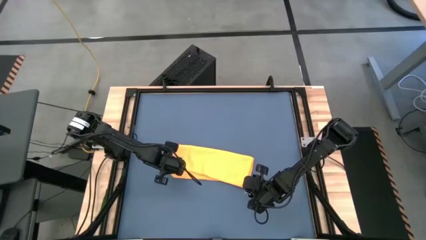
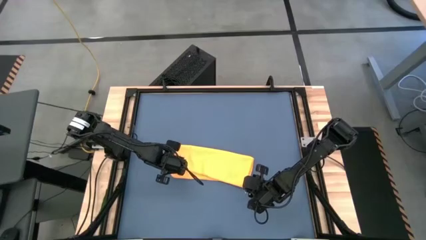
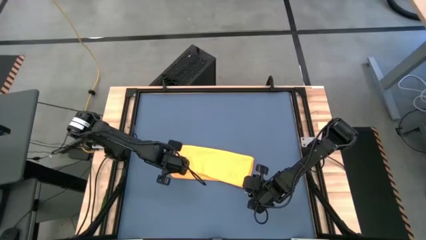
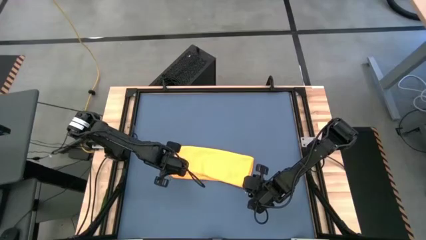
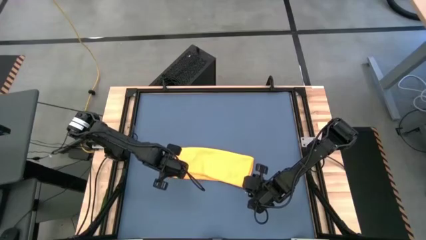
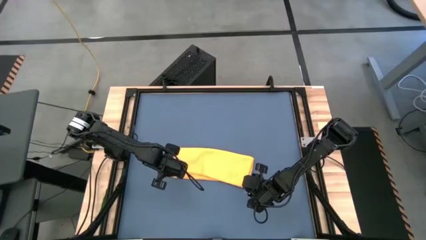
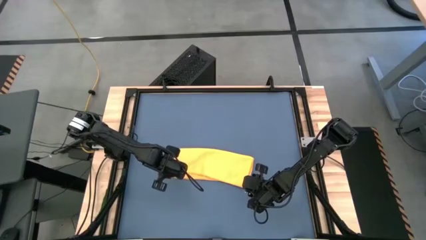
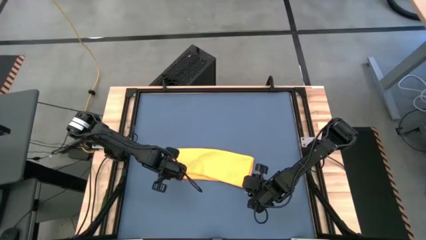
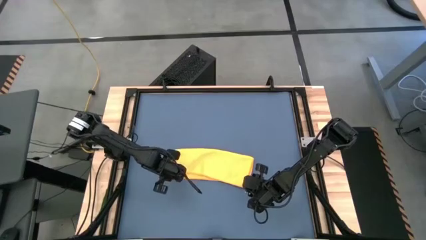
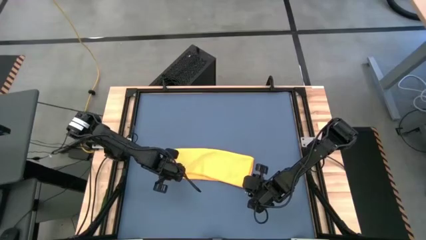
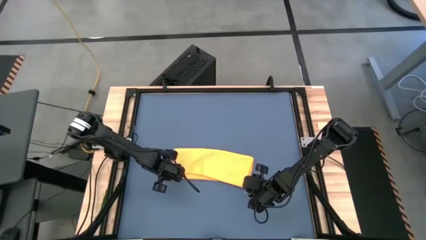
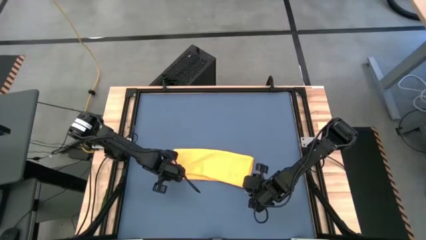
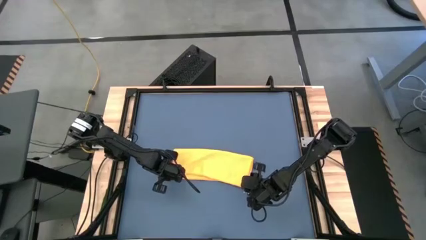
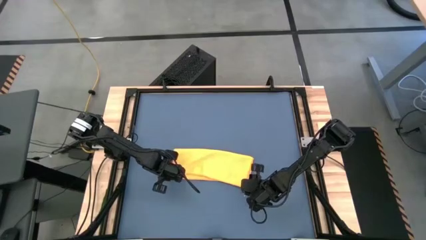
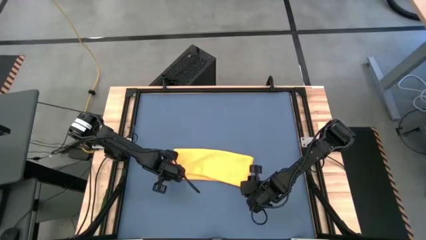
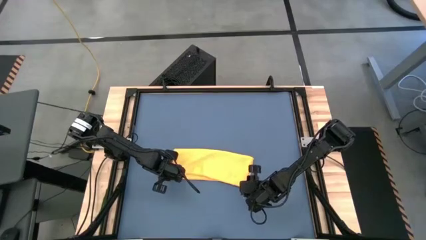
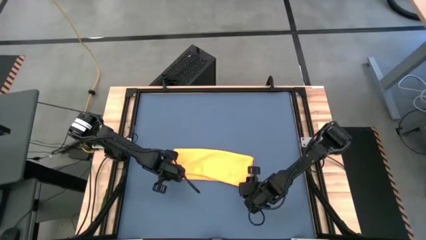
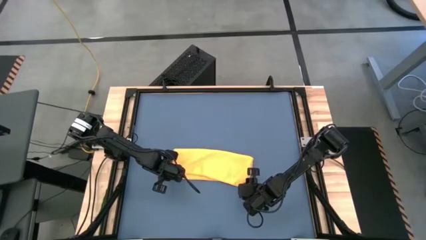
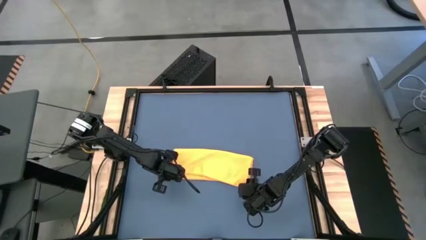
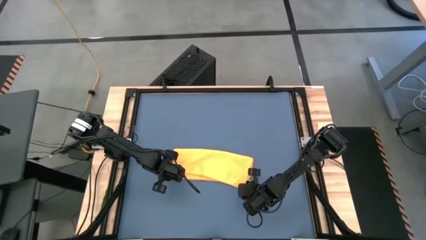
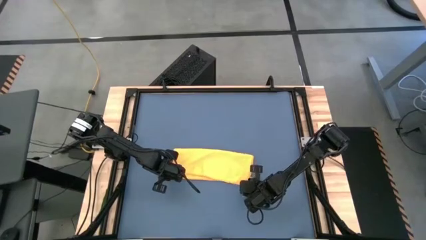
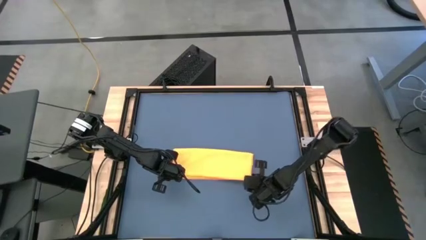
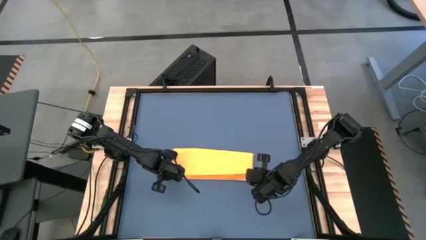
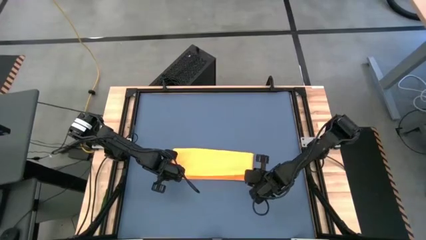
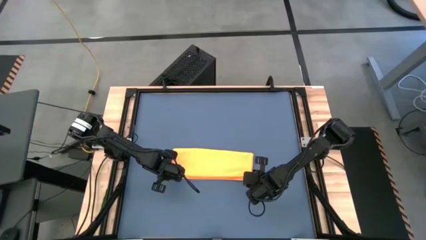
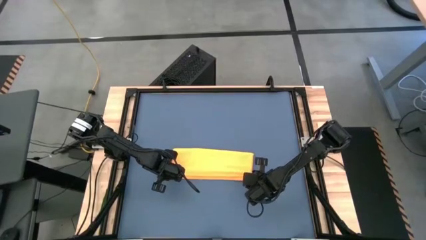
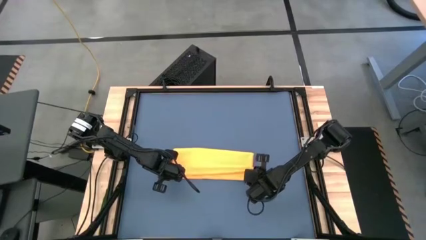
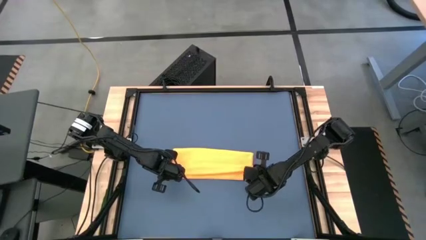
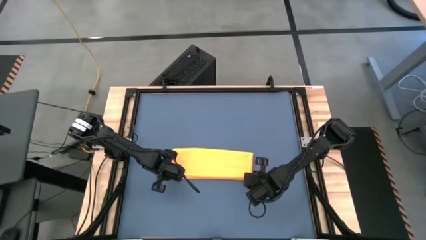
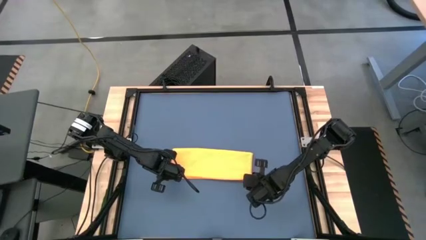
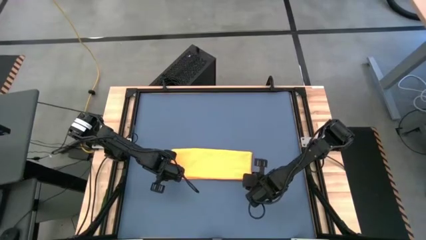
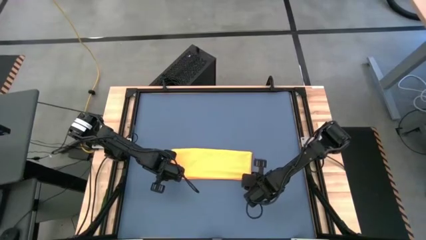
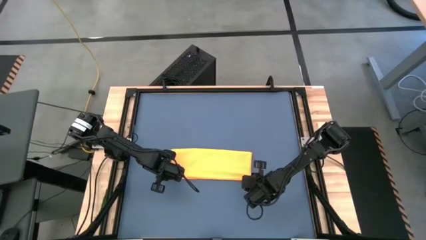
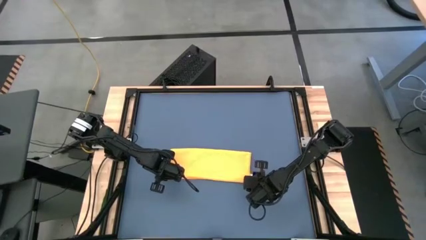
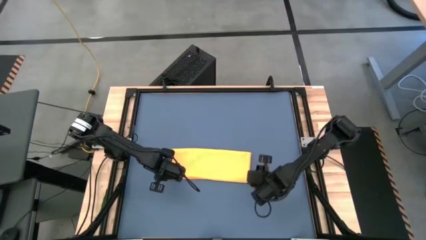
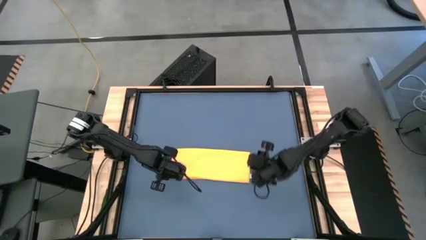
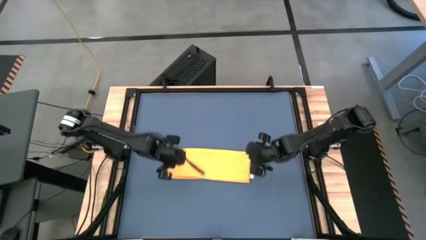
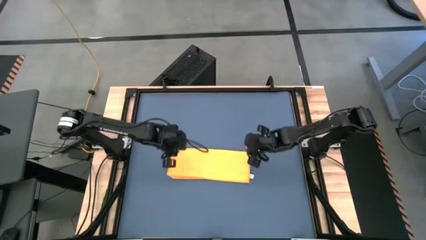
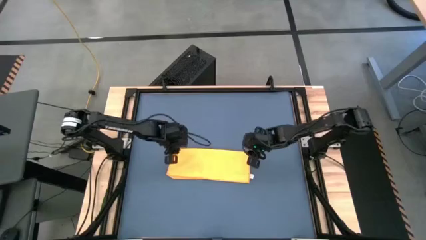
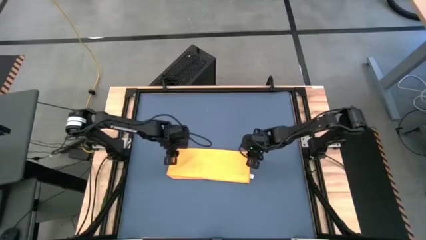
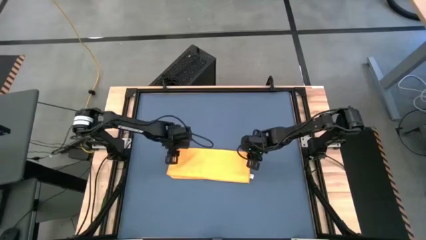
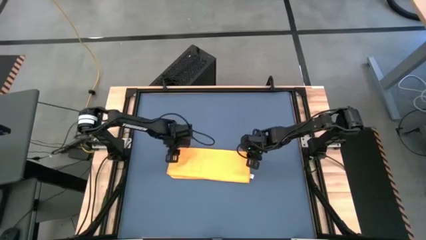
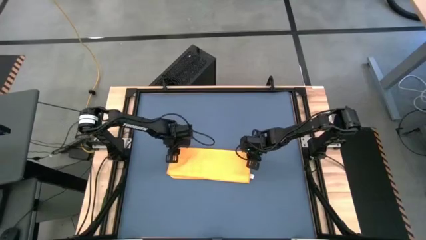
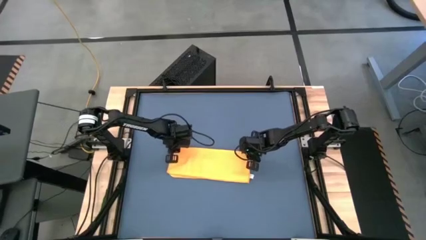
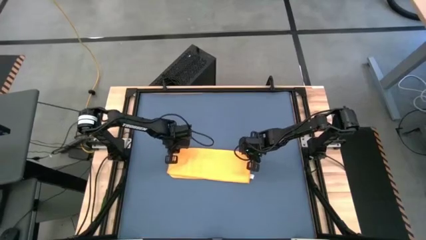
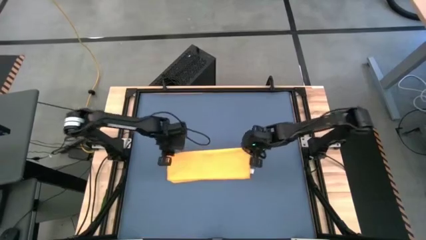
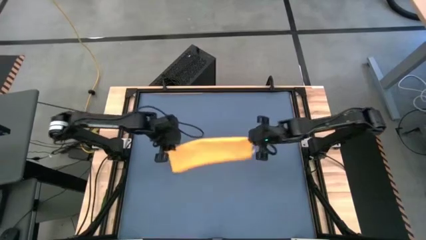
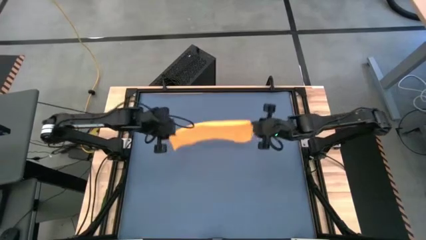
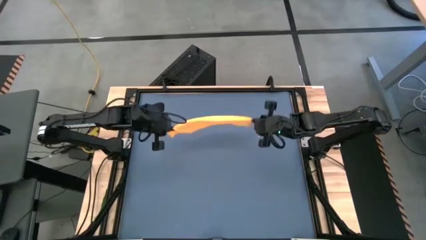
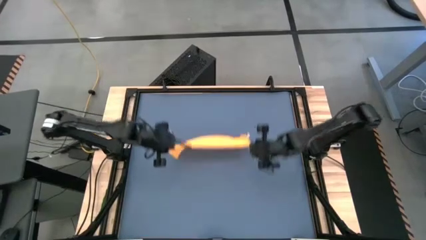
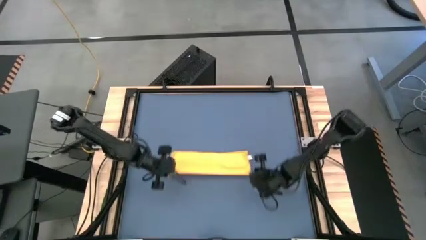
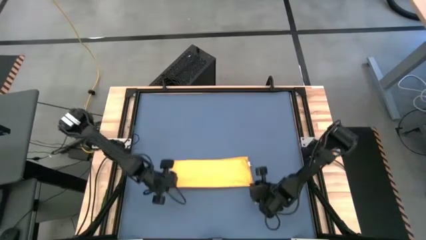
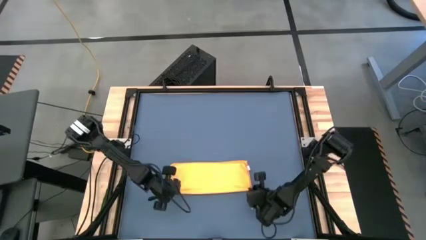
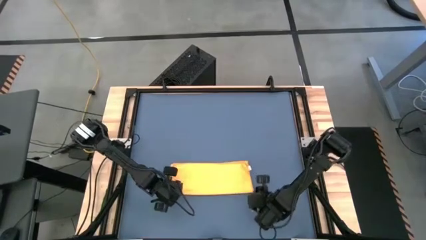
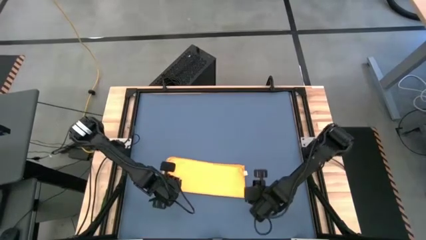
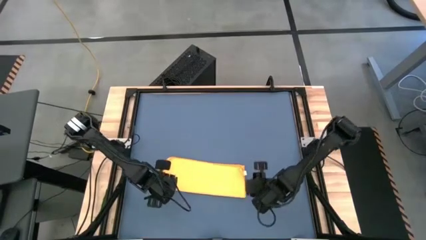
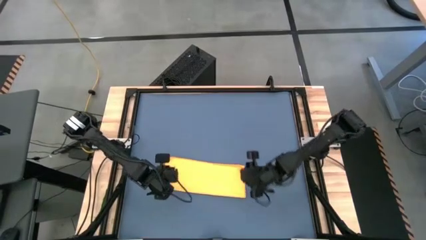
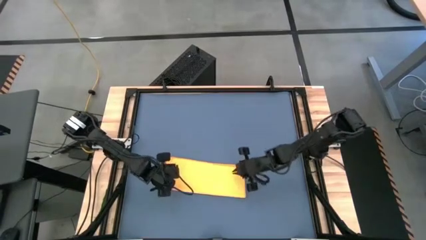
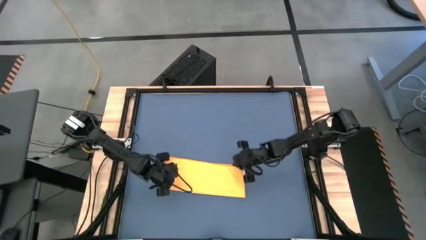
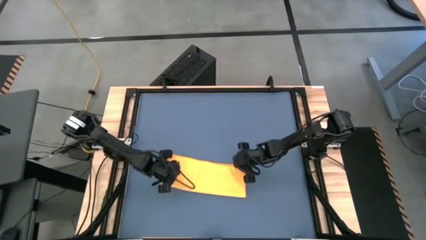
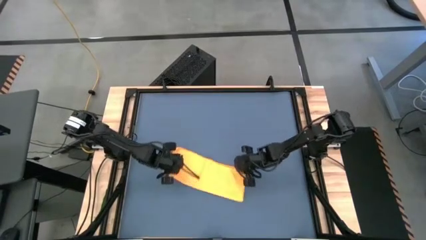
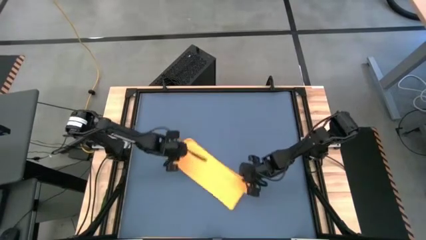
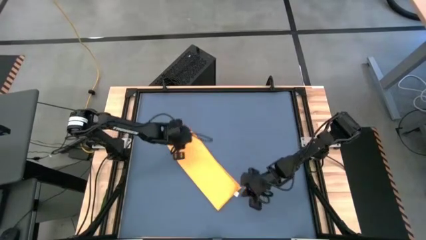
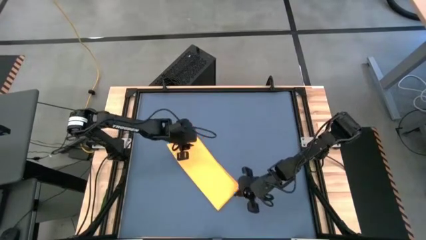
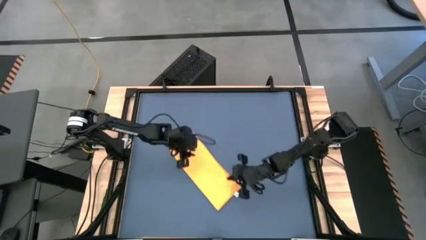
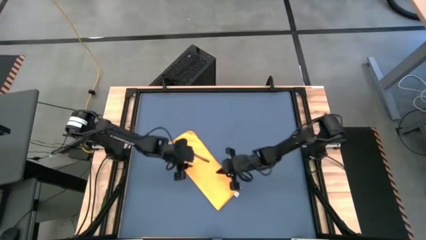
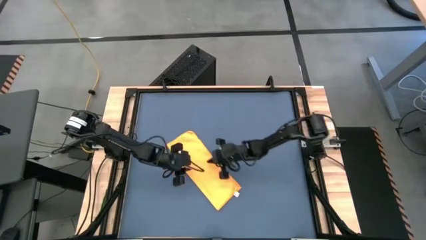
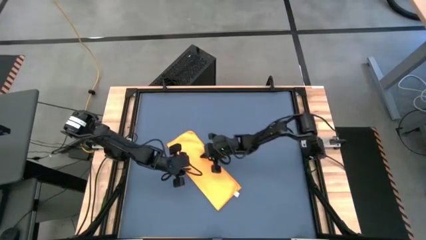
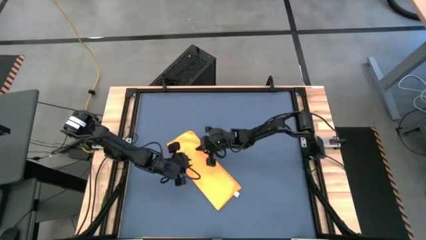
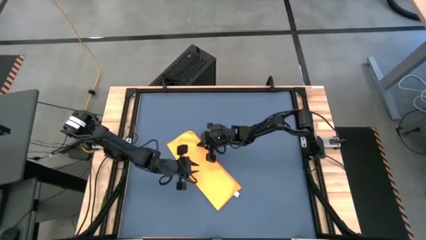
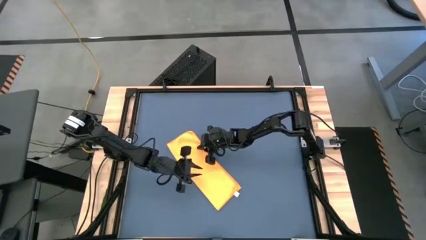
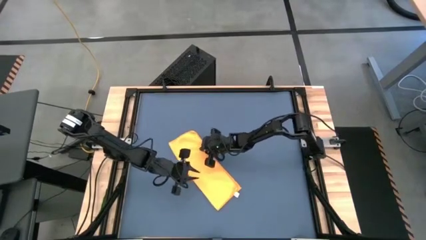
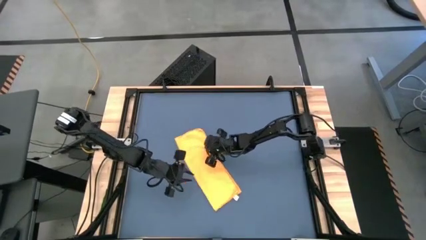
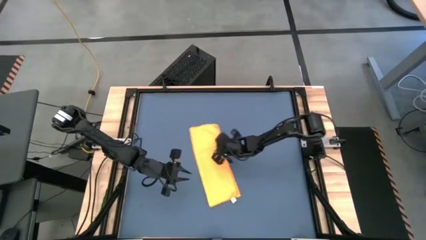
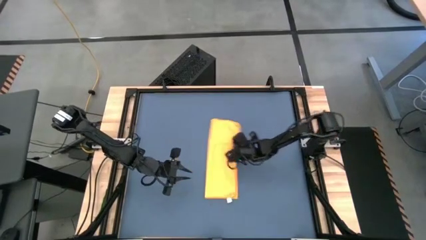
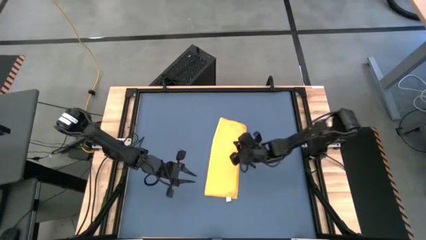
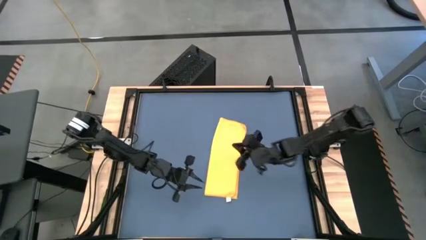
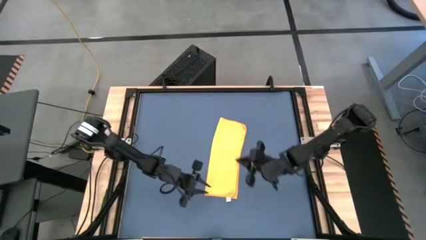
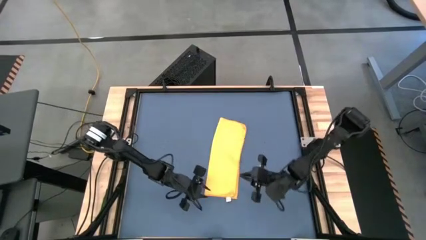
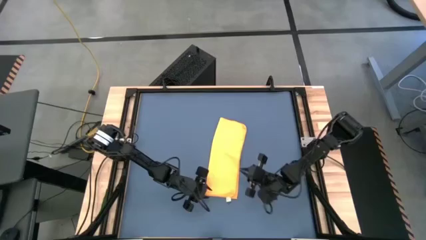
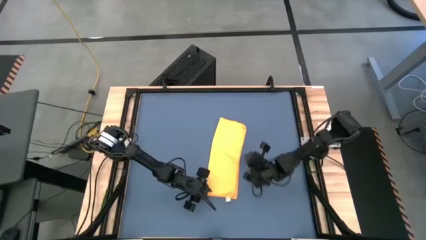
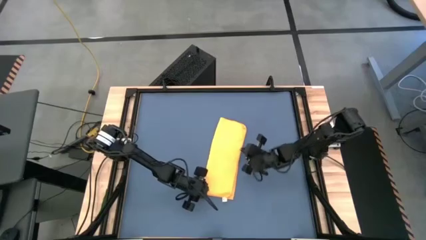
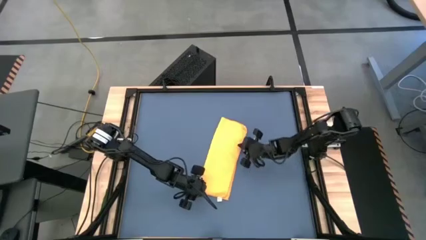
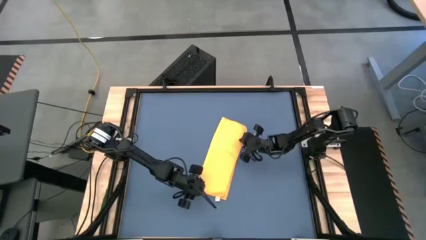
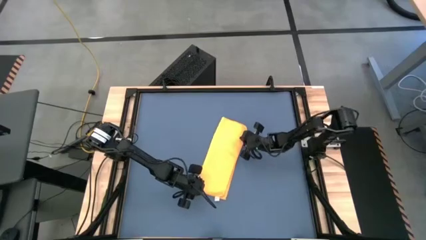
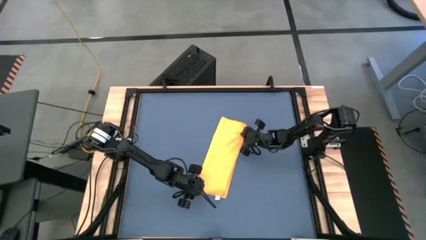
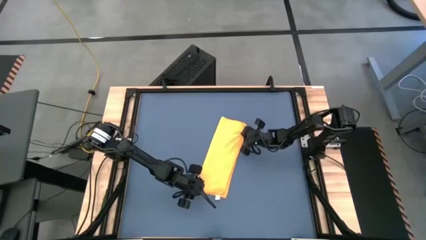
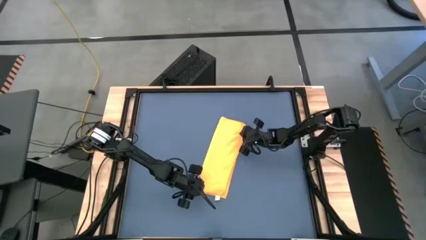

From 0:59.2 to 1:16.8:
Task: Roll towel
Fold the orange microfiber towel
